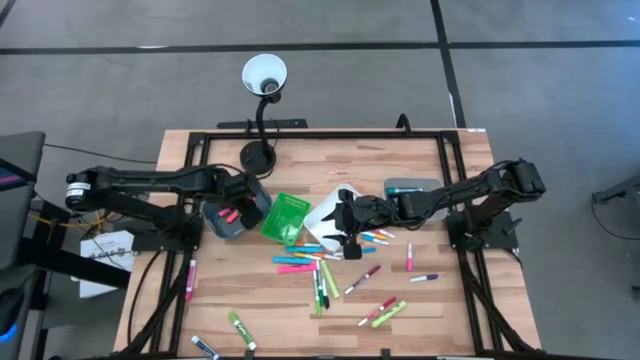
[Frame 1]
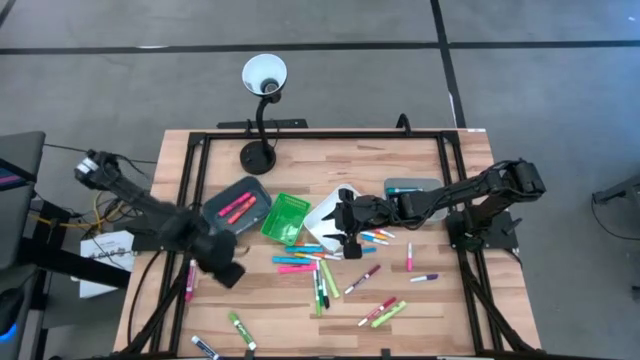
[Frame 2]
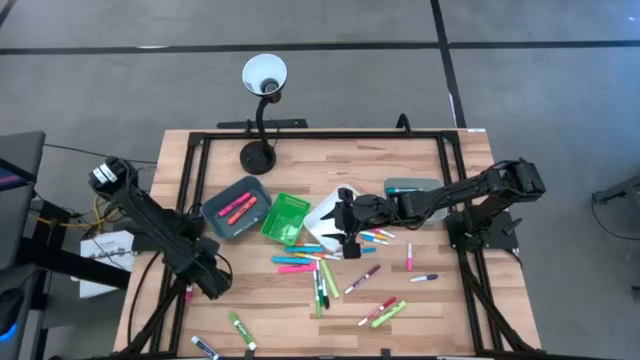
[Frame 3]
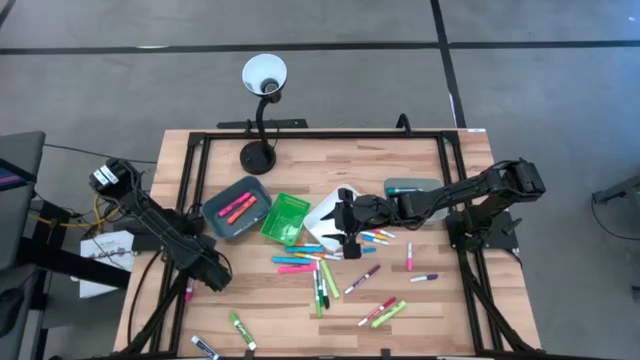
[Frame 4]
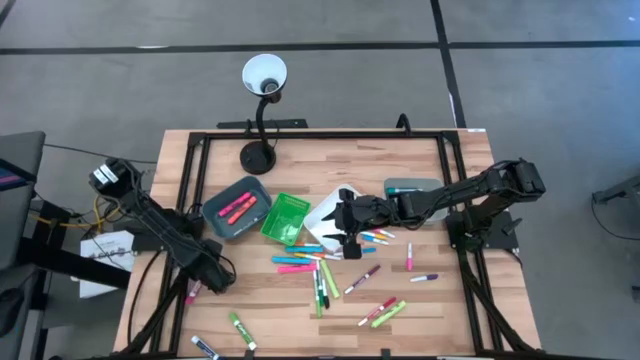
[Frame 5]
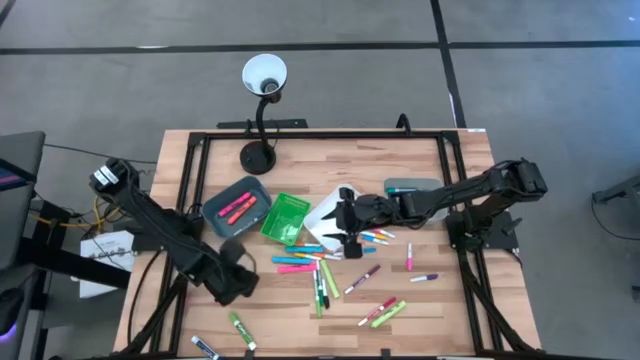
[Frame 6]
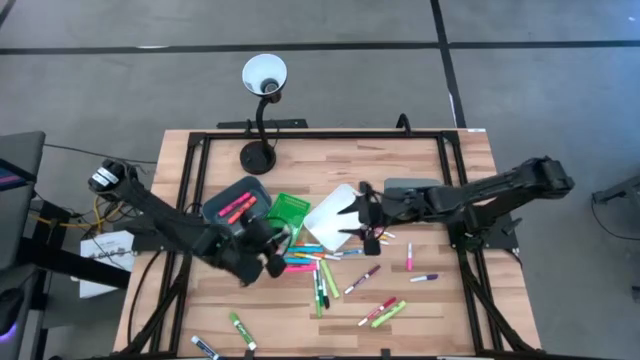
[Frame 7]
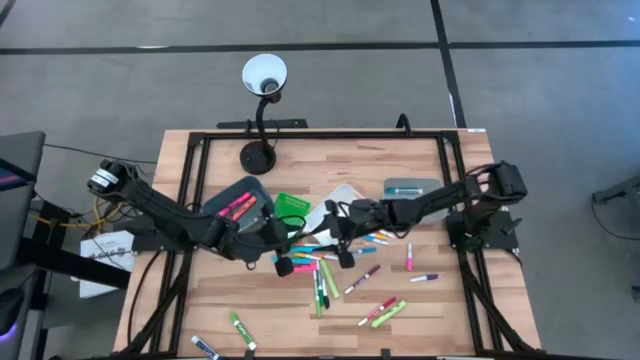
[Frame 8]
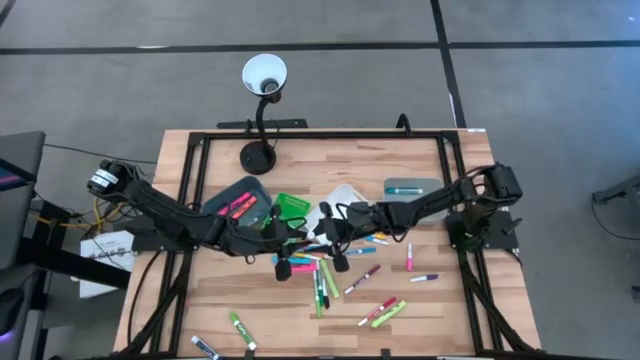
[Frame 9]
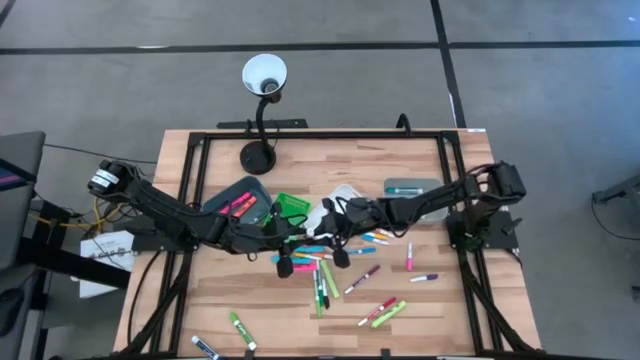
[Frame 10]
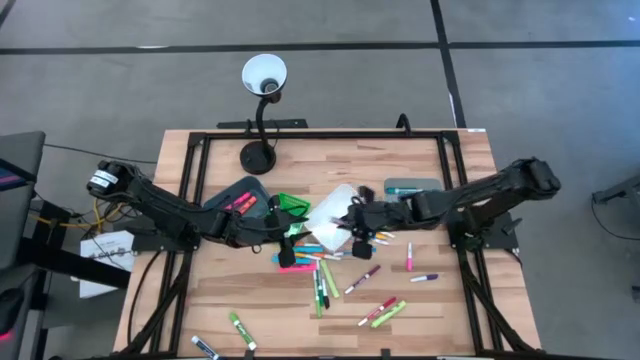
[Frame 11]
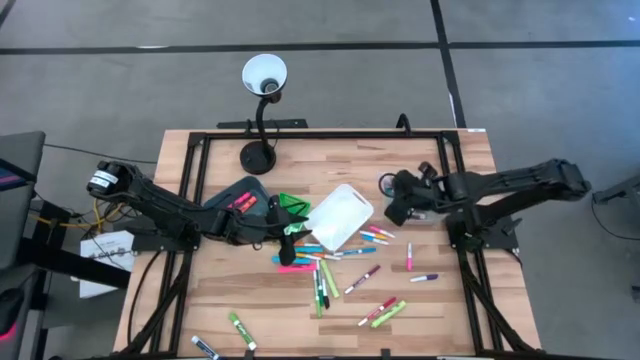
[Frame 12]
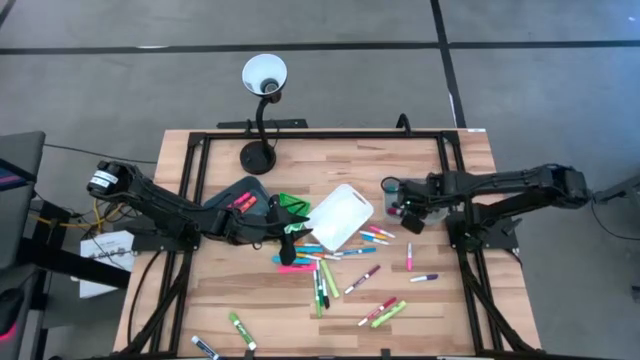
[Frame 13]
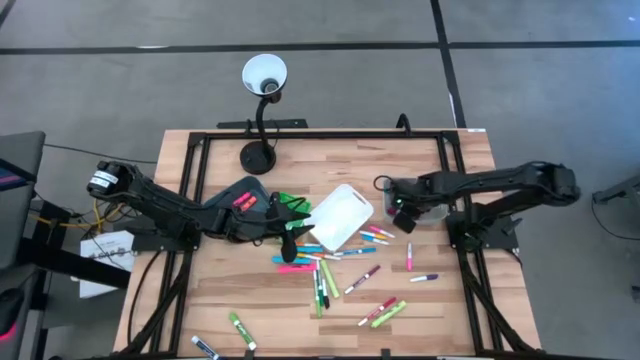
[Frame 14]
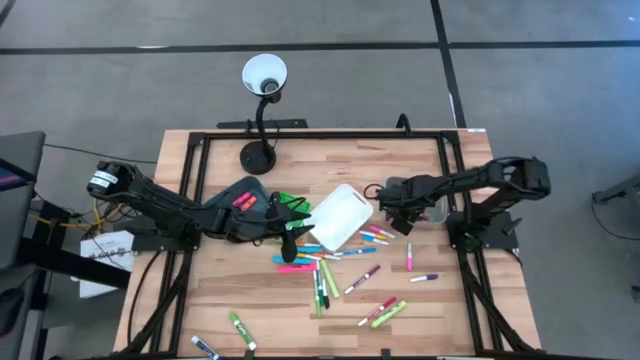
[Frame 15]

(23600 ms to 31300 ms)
Task: Pick & Place Markers
Put the pink marker pen into the gray bin

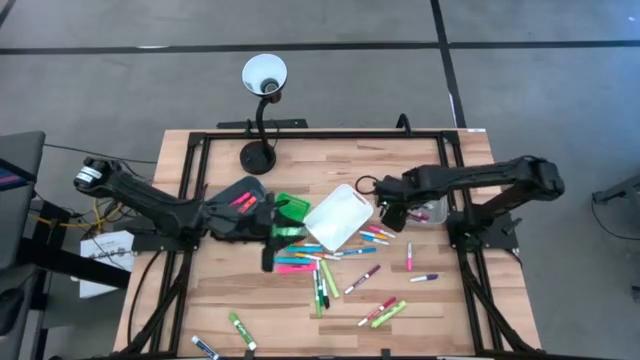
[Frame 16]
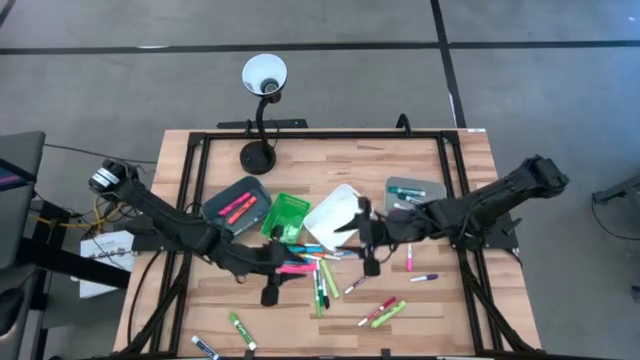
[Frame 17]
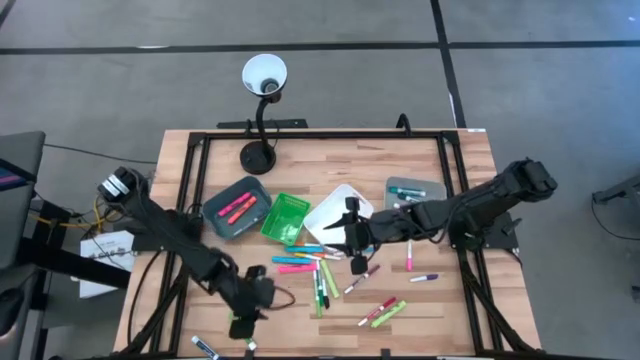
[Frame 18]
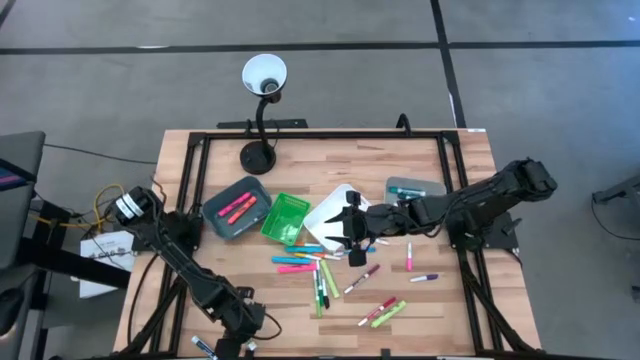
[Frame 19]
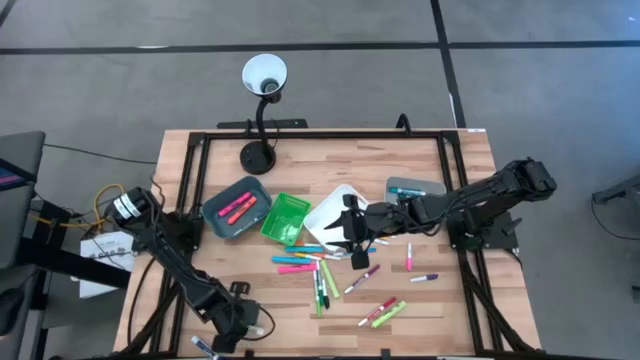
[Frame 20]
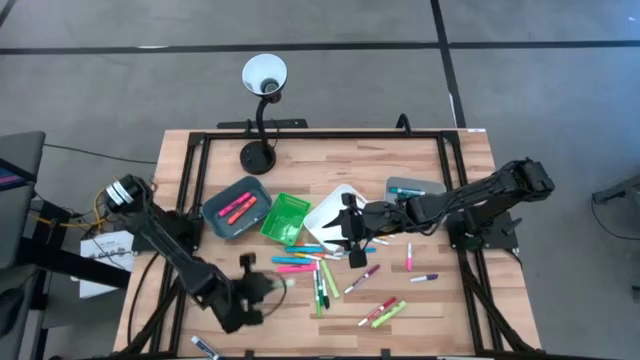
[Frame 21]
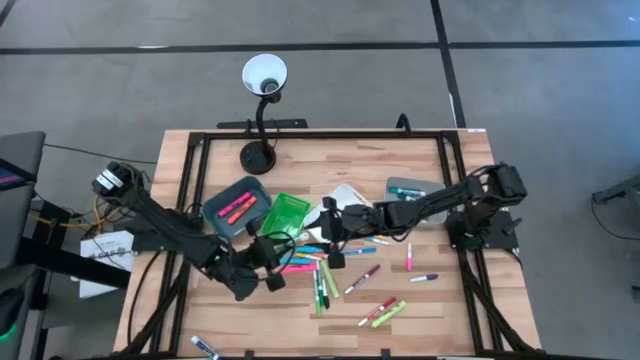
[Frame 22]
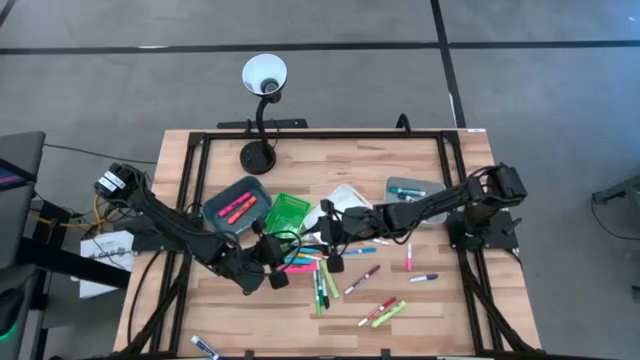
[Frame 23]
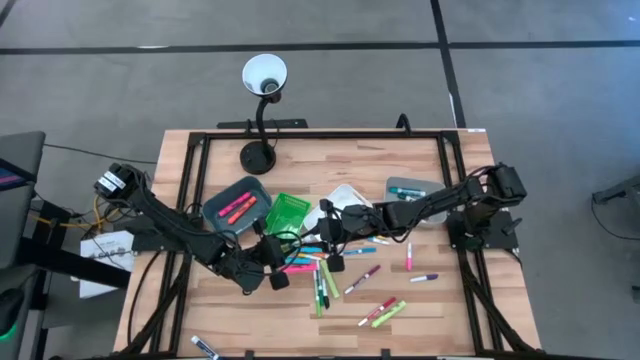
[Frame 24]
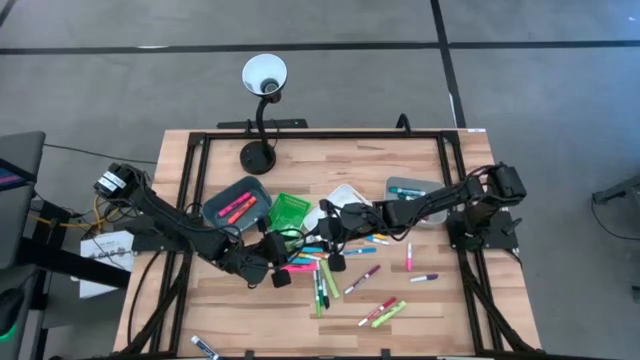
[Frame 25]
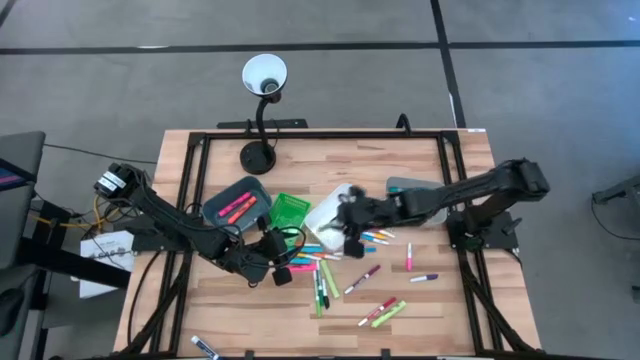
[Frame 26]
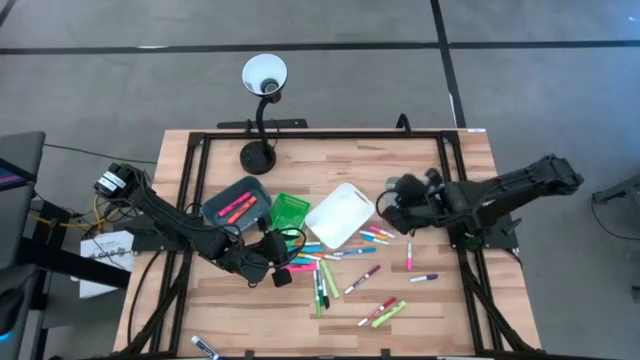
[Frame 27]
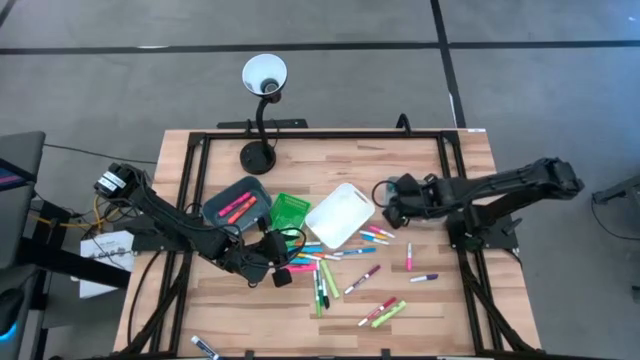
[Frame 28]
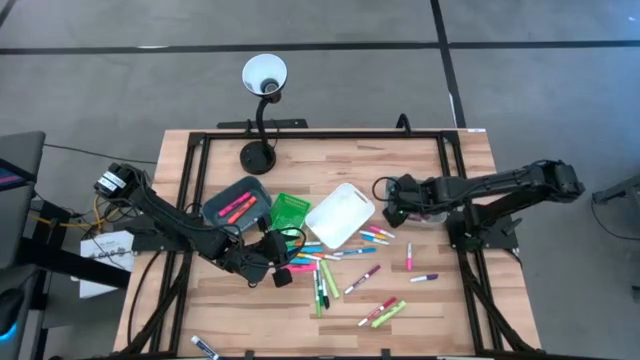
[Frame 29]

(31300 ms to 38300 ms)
Put the green marker pen into the gray bin

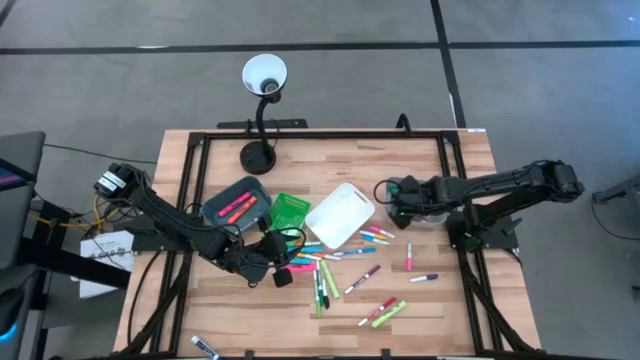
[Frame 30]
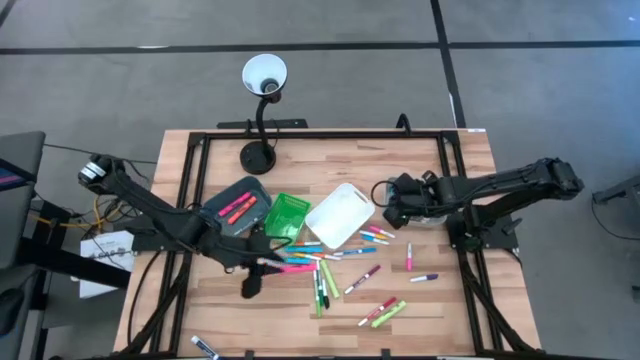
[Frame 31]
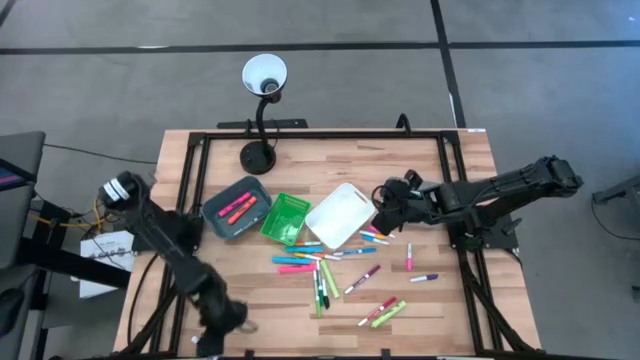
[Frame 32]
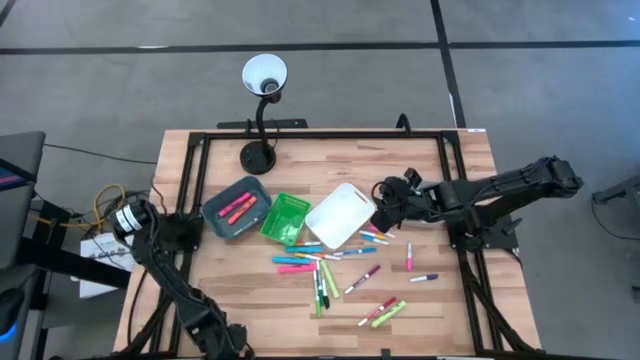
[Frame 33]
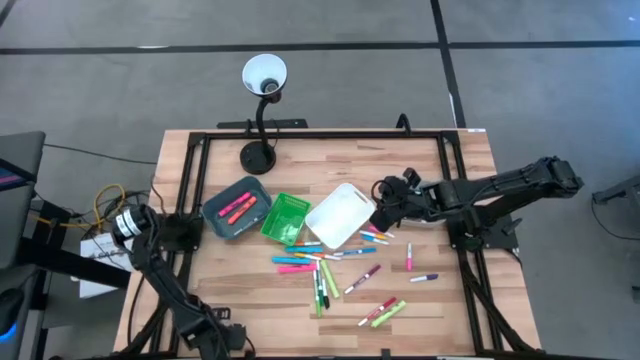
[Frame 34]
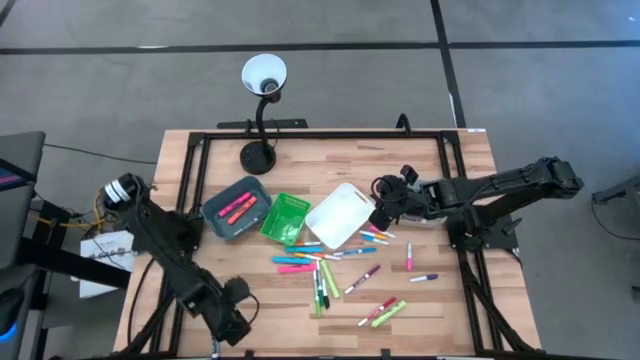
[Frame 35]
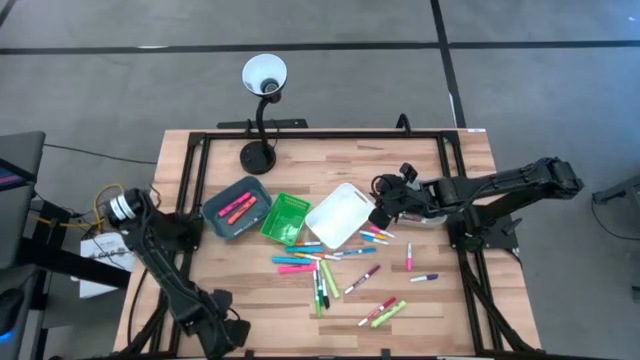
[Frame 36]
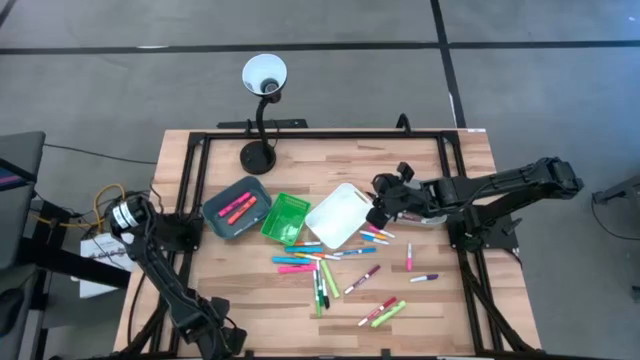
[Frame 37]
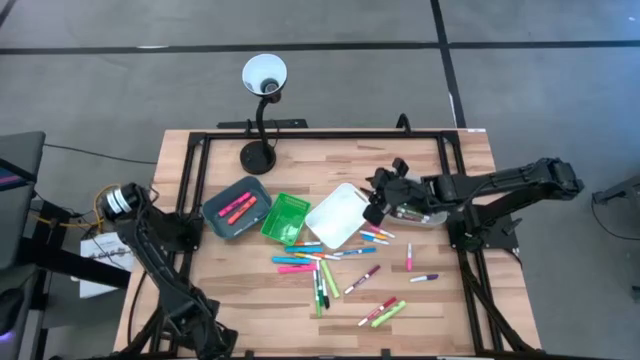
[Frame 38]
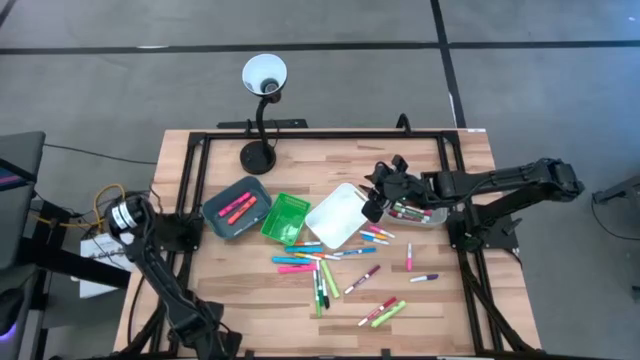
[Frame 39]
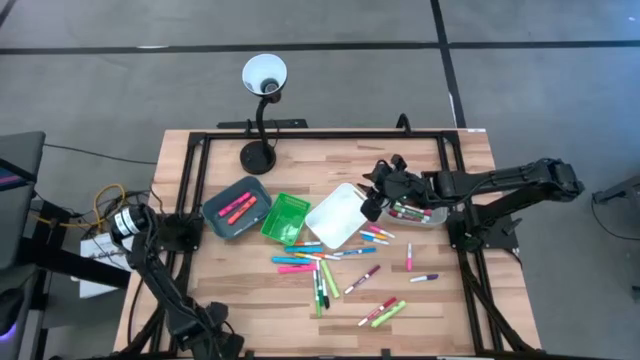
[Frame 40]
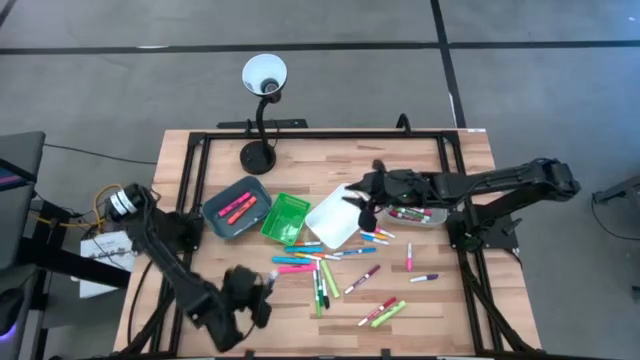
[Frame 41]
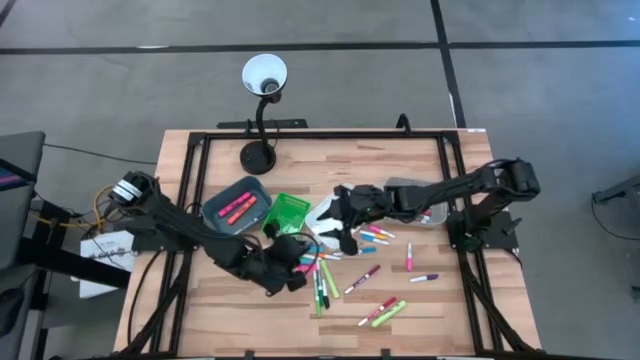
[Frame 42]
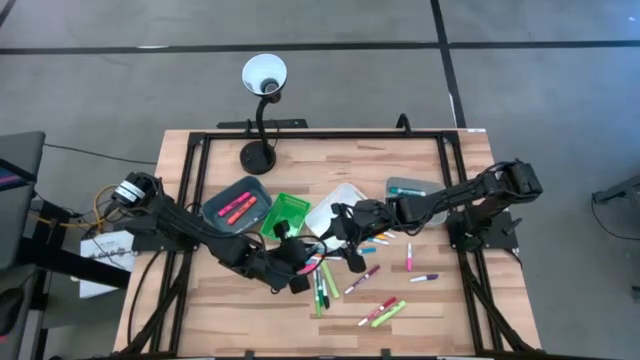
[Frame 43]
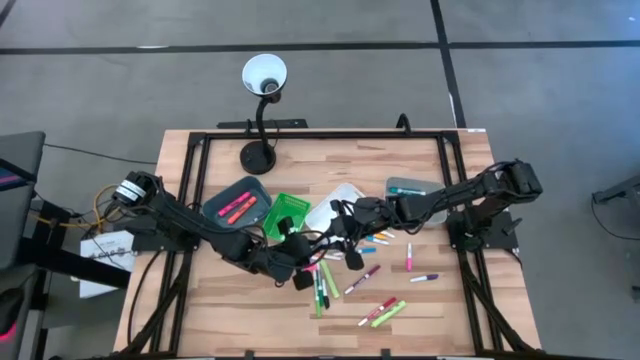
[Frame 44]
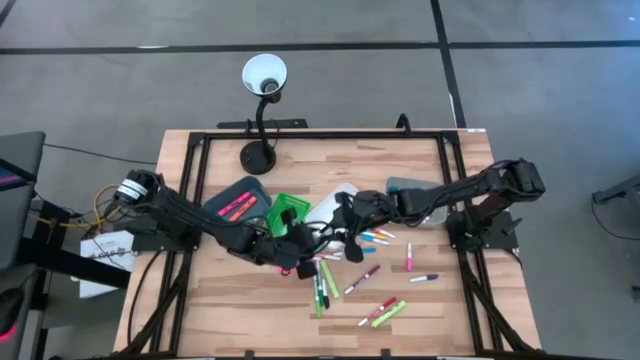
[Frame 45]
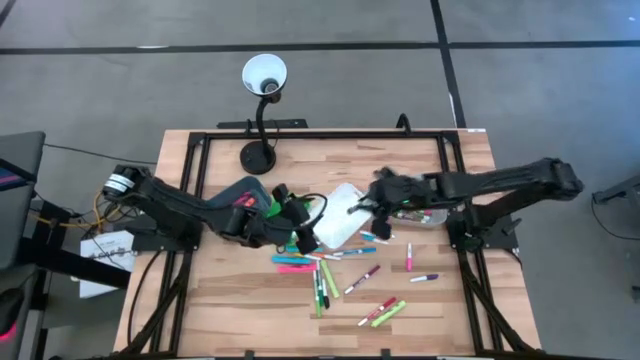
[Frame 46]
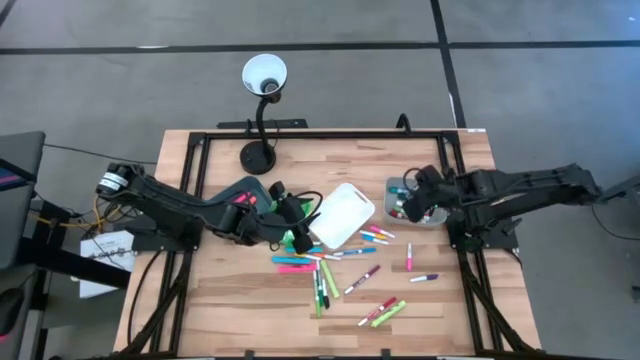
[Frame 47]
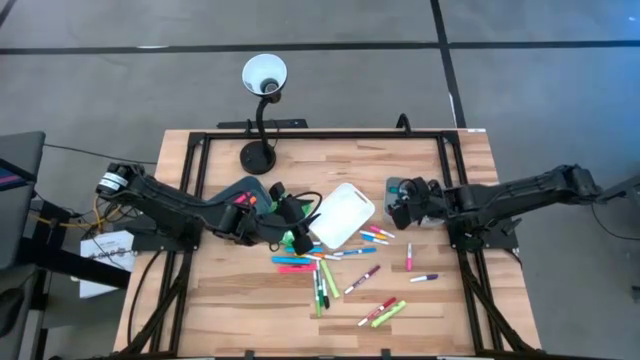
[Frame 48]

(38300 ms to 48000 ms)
Put the blue marker pen into the gray bin
